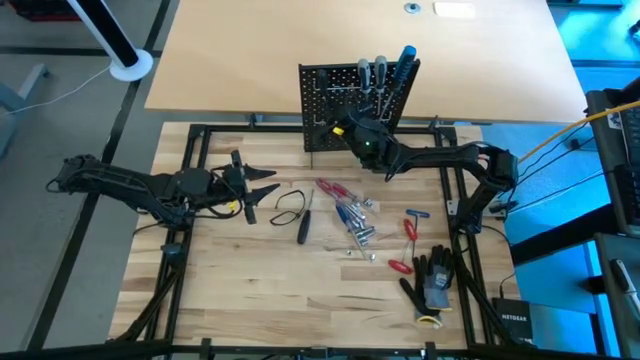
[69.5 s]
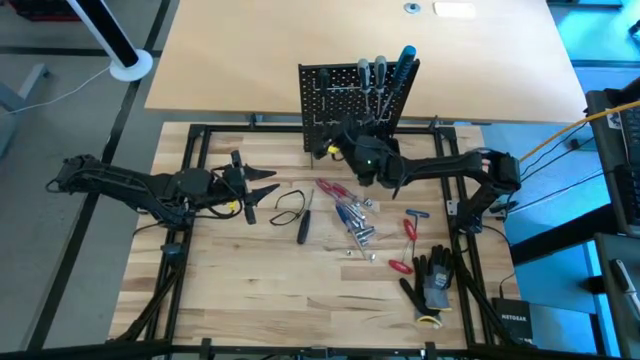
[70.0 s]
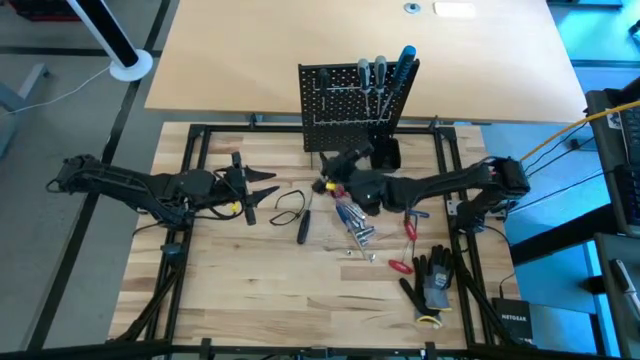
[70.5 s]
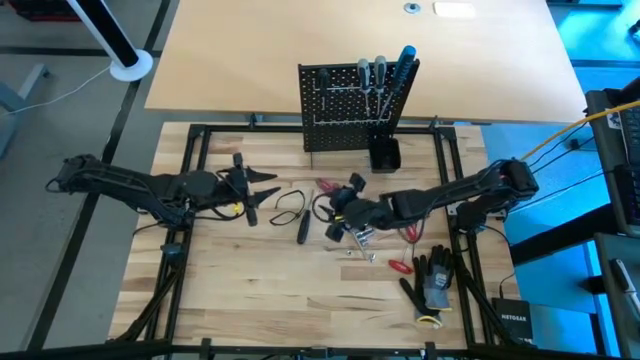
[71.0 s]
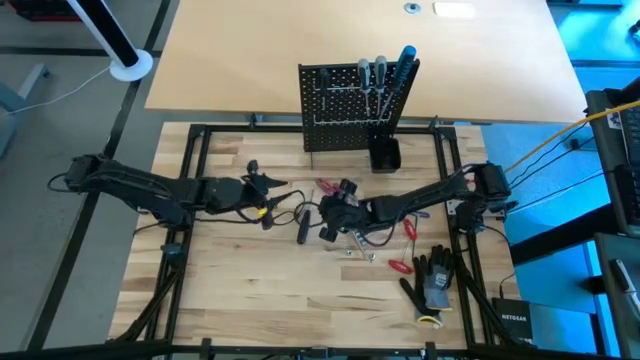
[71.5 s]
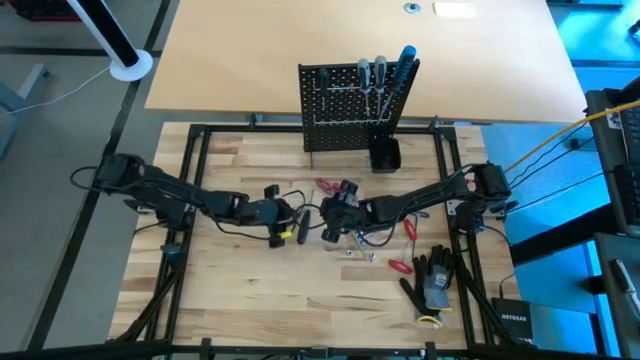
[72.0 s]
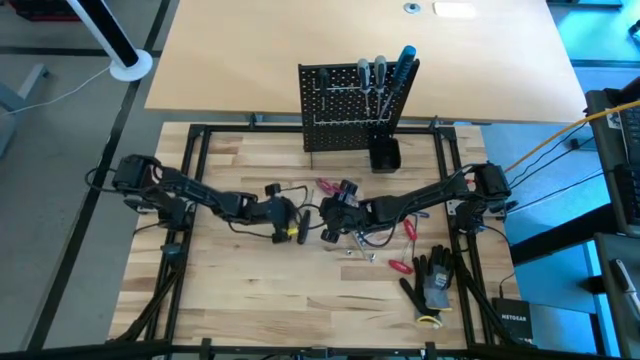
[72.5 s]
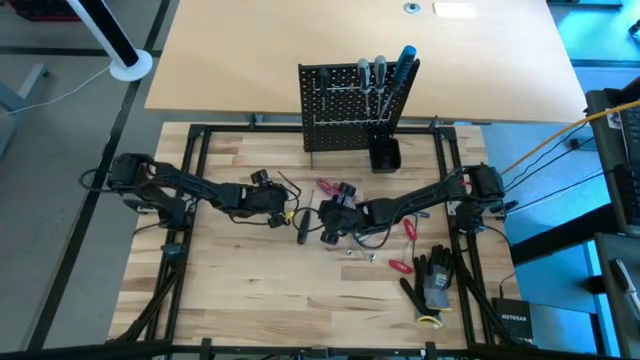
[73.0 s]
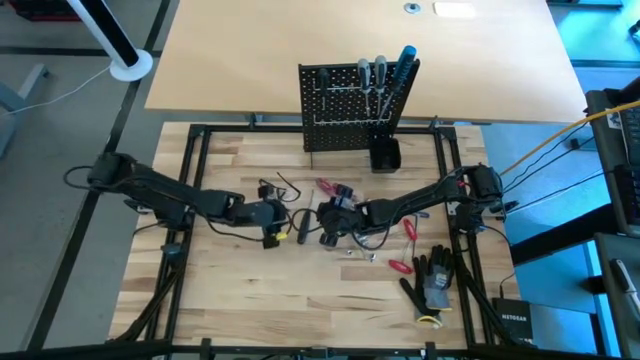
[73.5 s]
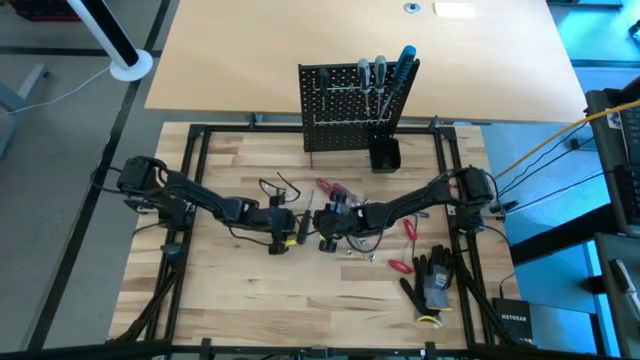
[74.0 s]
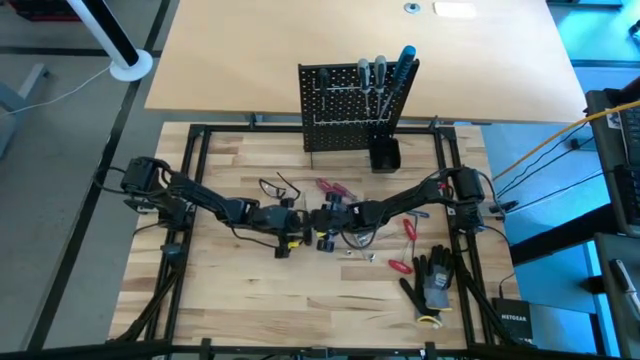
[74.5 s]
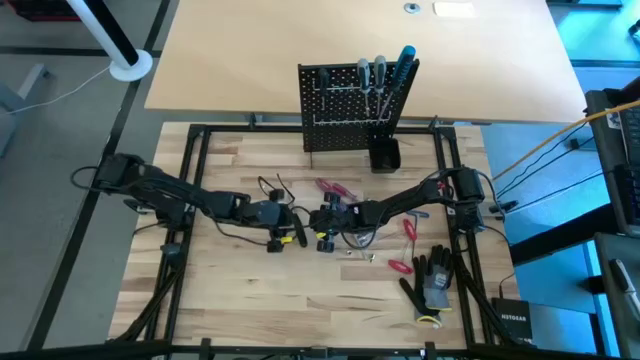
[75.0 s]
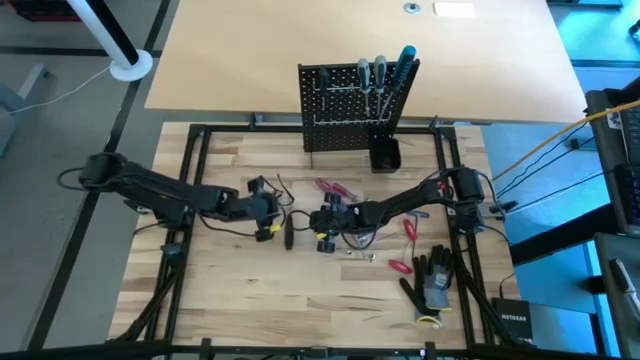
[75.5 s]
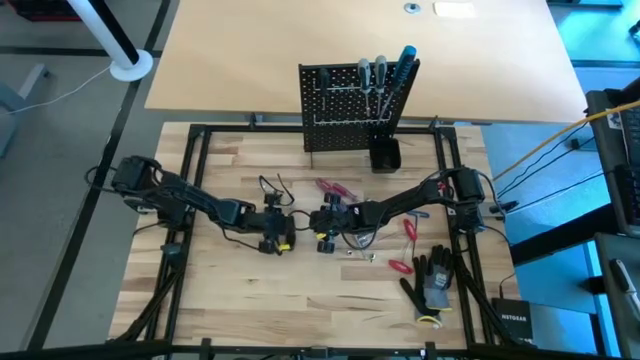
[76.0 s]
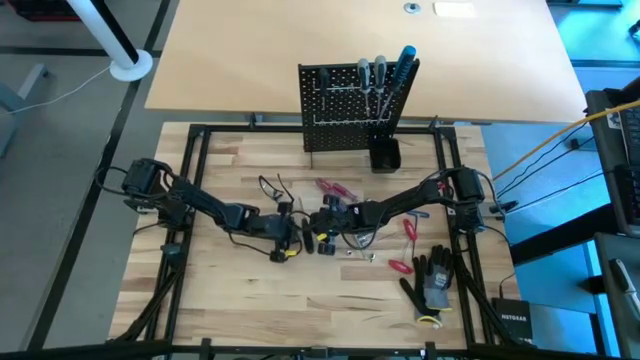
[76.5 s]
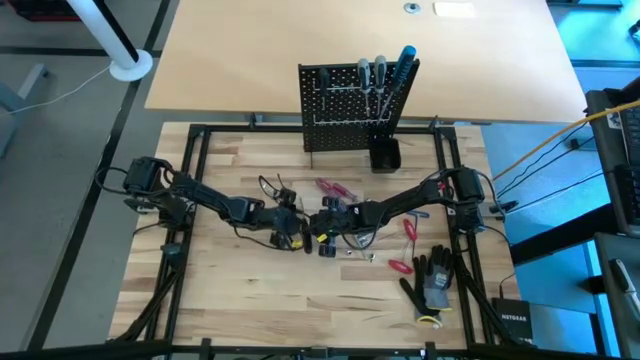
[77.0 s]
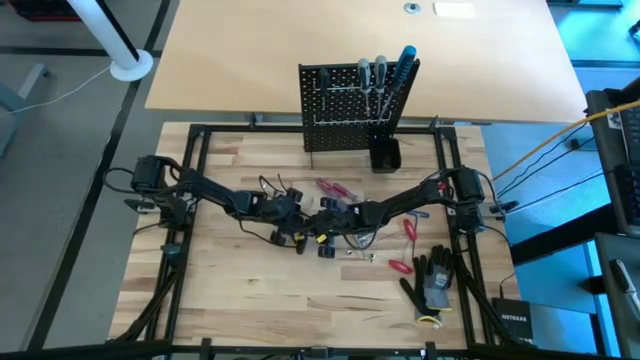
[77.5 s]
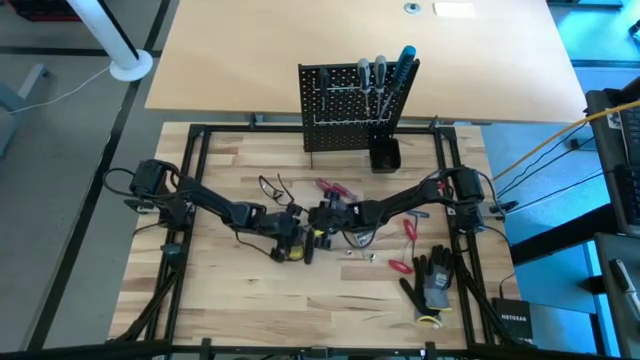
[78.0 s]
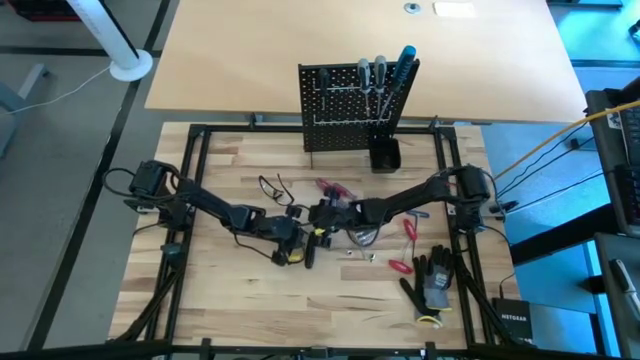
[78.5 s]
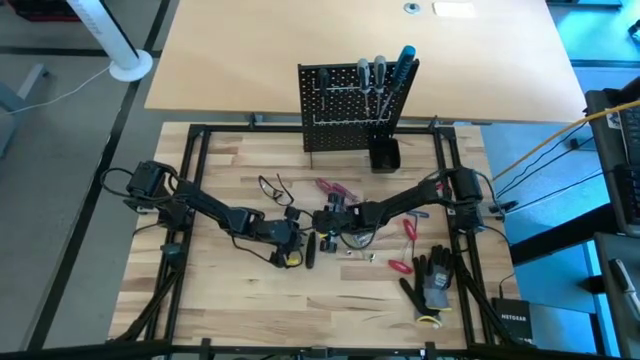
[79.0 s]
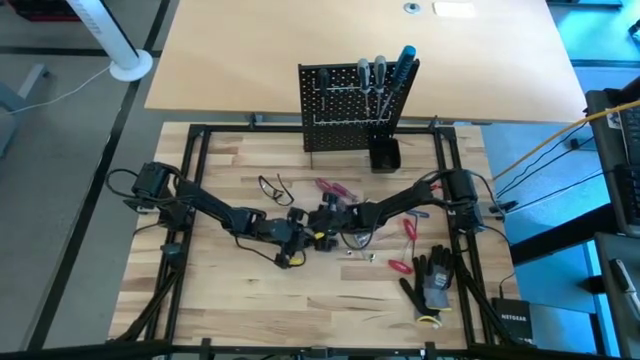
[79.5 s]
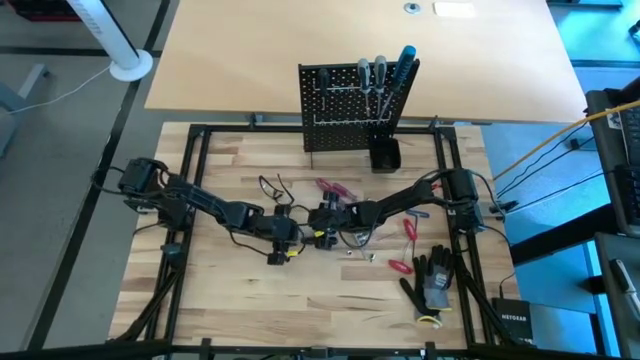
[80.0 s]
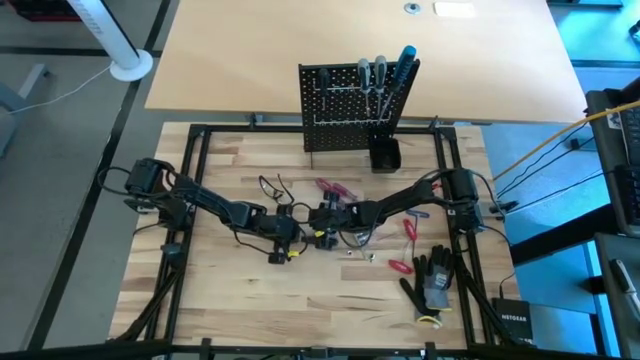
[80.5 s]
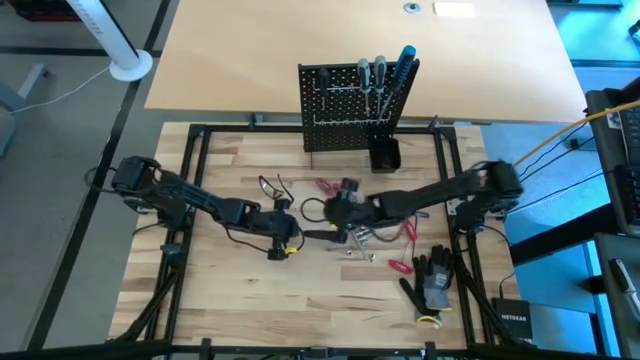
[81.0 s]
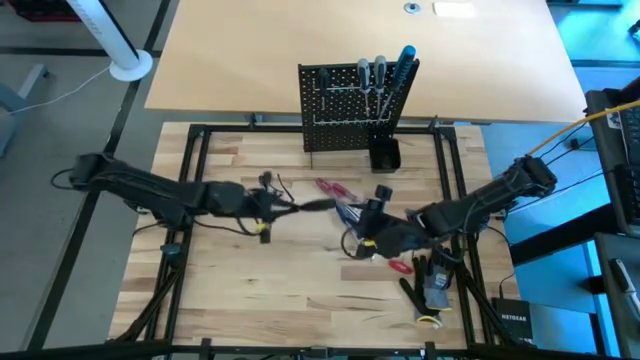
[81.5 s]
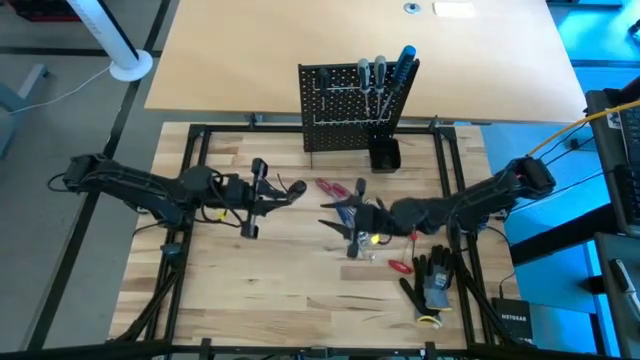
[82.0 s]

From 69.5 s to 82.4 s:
Task: Hang tools onto peg board
Hang the black screwdriver on the peg board

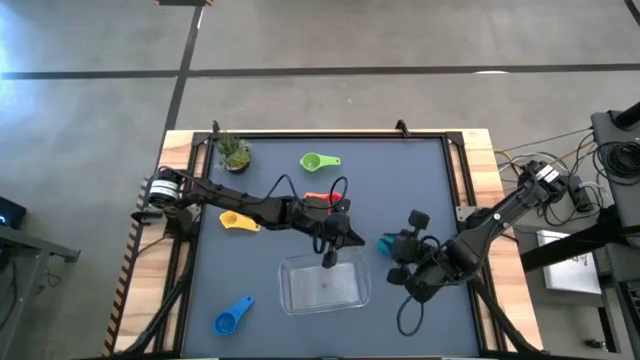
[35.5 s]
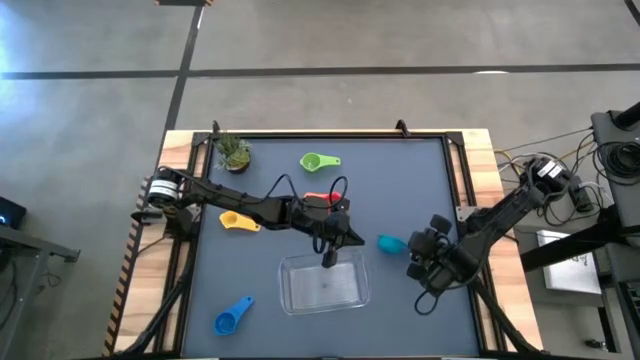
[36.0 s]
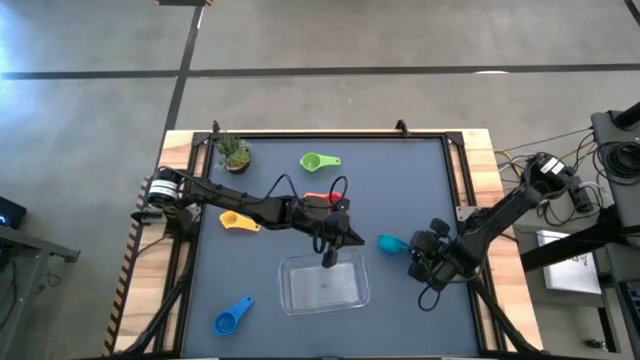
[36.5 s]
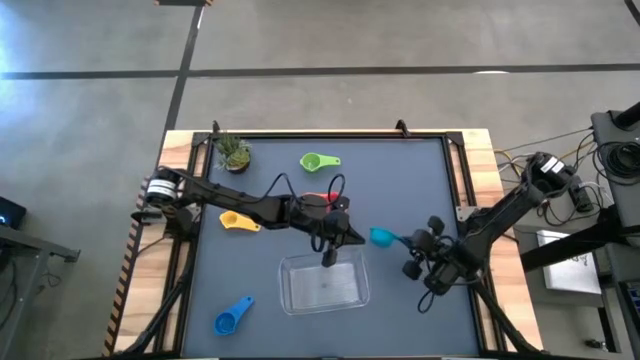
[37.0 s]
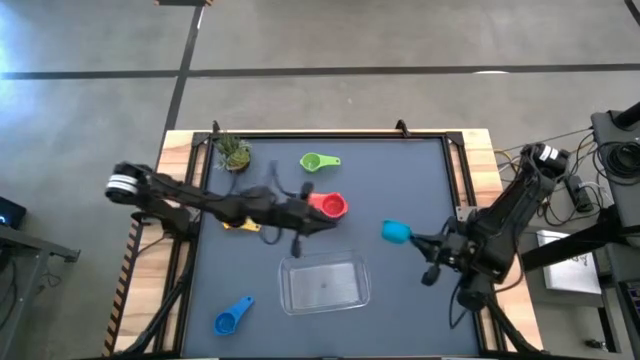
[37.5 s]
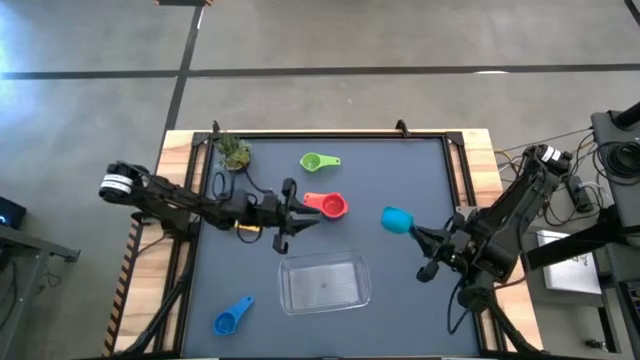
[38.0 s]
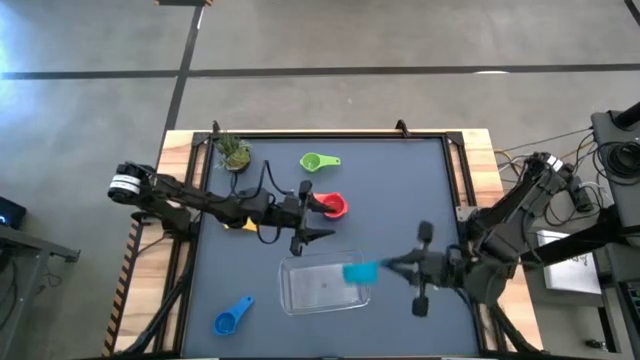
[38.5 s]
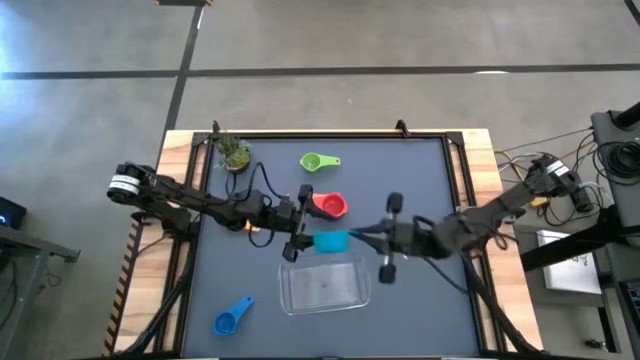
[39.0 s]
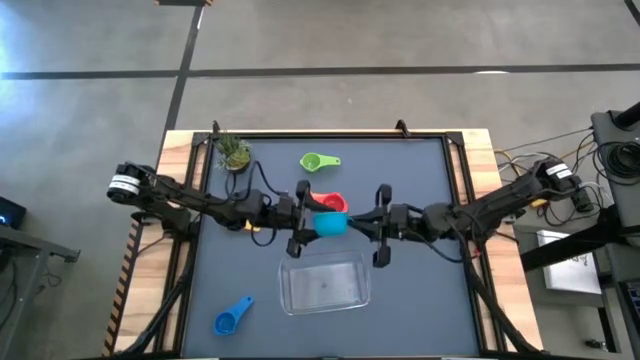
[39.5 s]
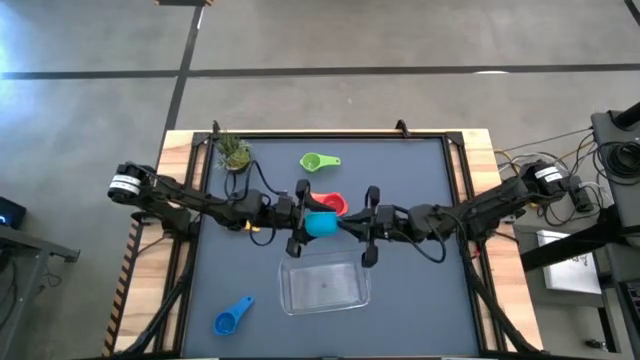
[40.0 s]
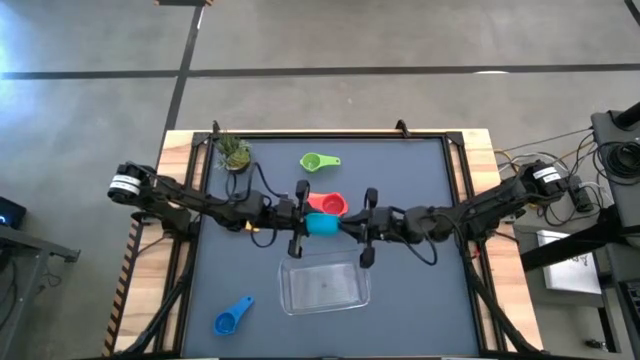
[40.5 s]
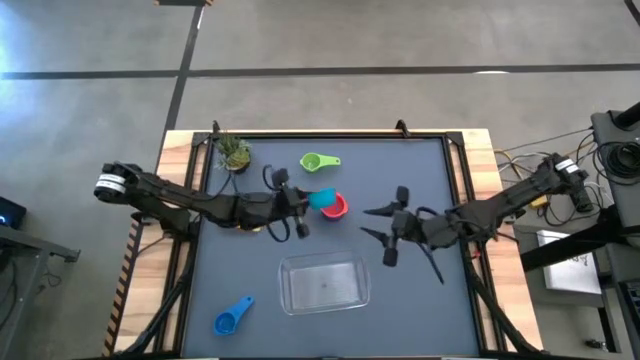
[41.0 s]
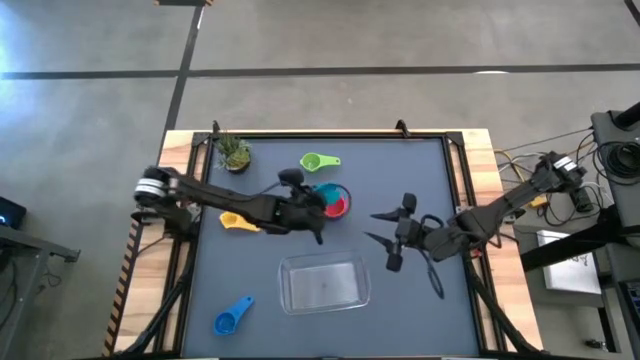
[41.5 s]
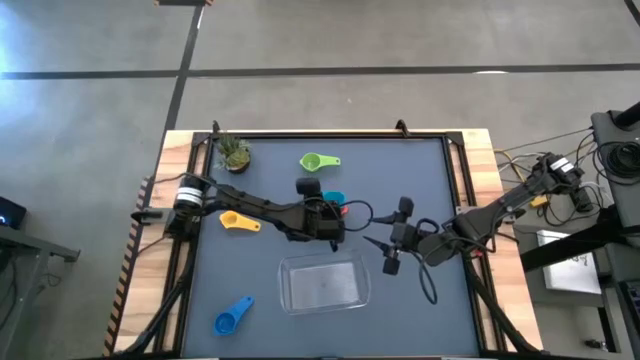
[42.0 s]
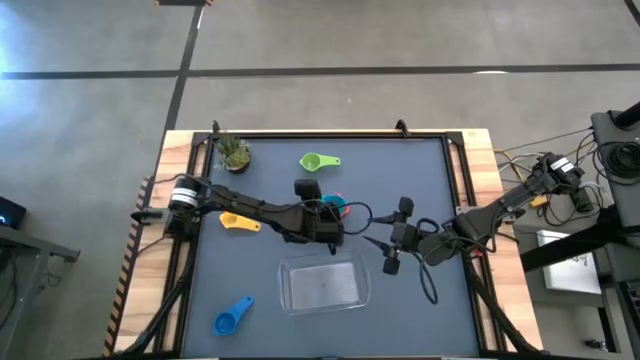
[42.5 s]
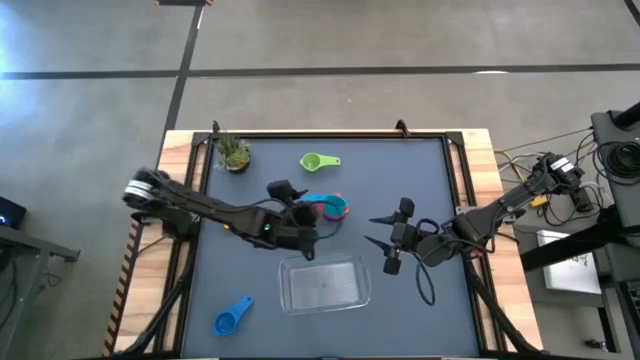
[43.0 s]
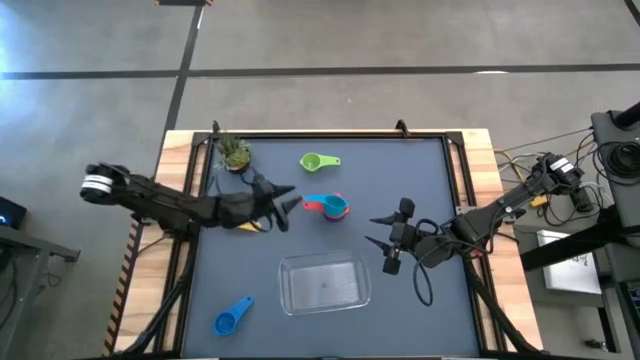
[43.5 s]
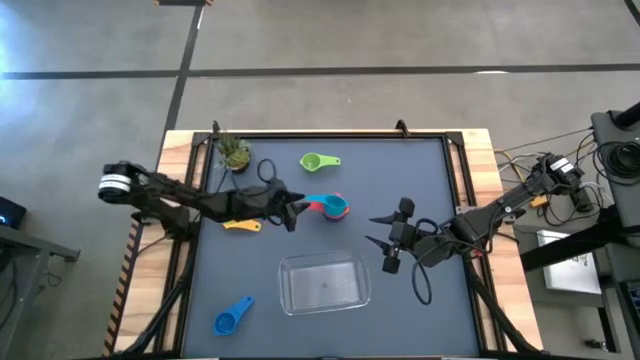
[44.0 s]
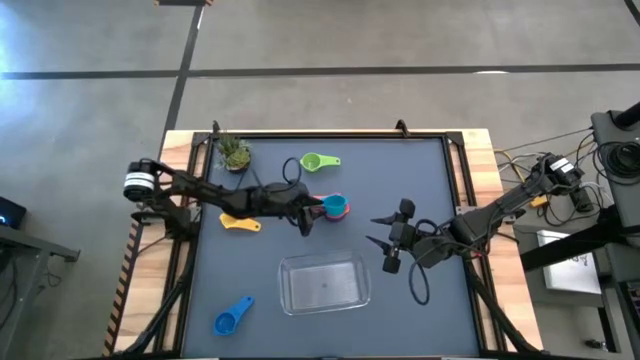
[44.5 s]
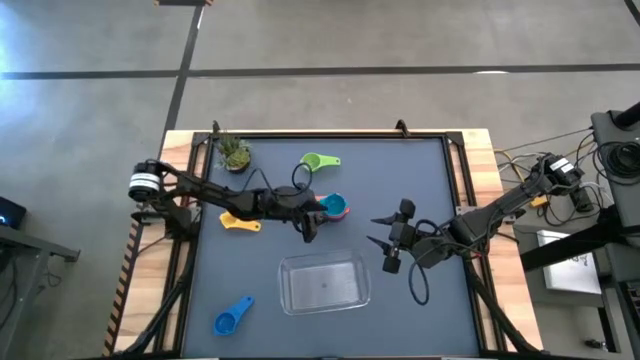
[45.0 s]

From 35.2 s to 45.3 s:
Task: Nest measuring cups in basket
Stack the light blue measuring cup on top of the red measuring cup
